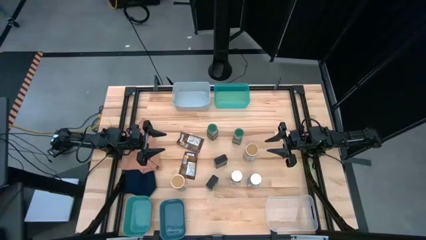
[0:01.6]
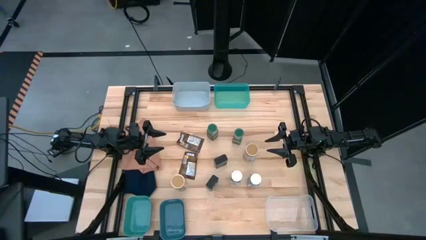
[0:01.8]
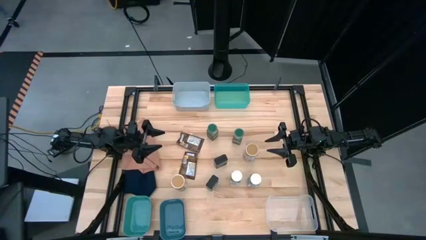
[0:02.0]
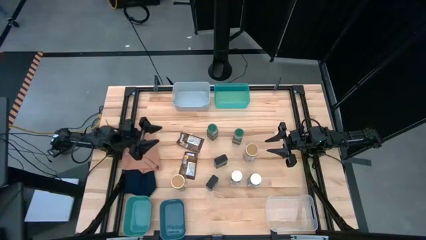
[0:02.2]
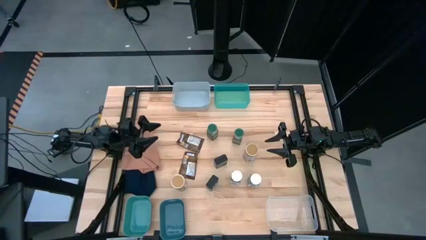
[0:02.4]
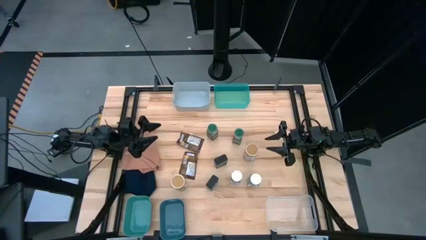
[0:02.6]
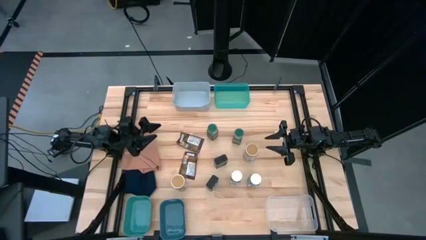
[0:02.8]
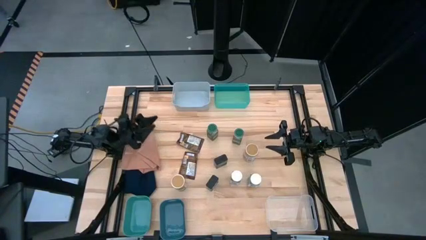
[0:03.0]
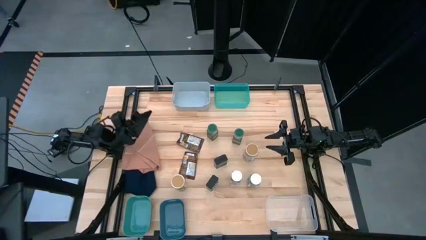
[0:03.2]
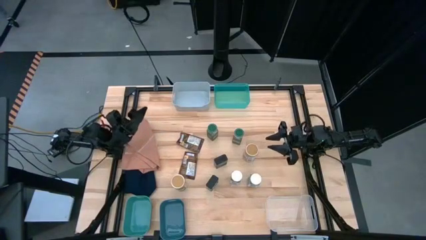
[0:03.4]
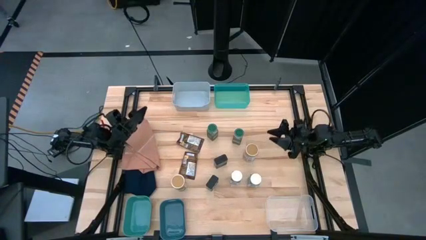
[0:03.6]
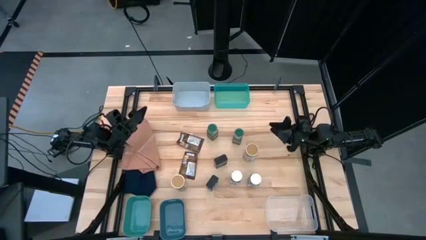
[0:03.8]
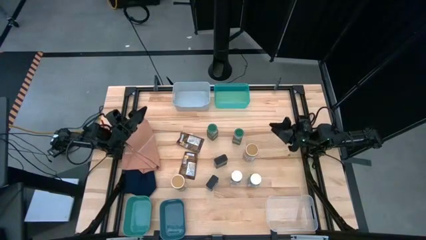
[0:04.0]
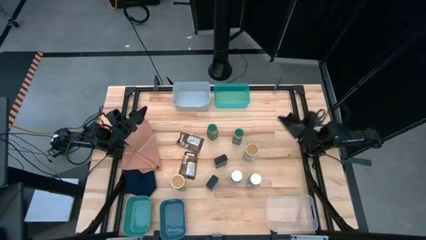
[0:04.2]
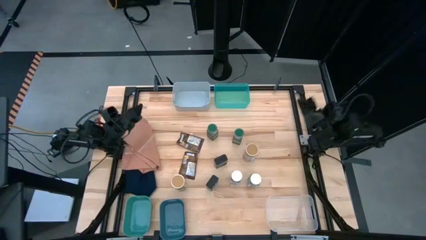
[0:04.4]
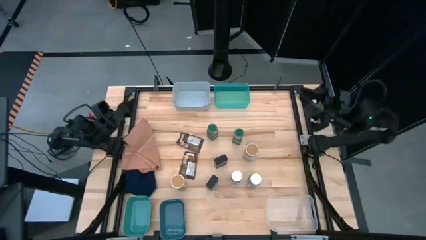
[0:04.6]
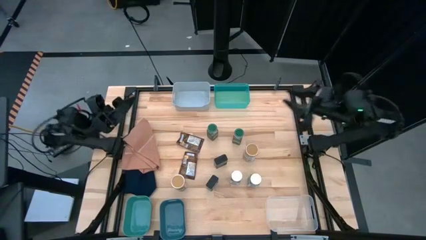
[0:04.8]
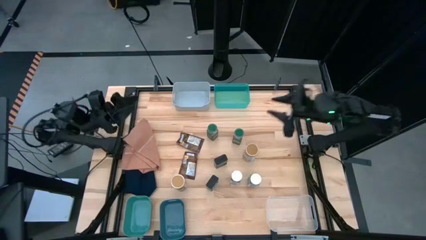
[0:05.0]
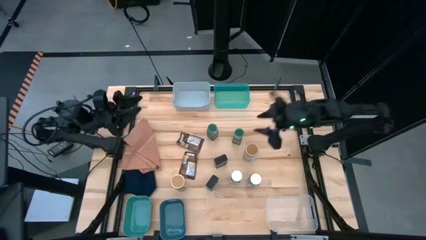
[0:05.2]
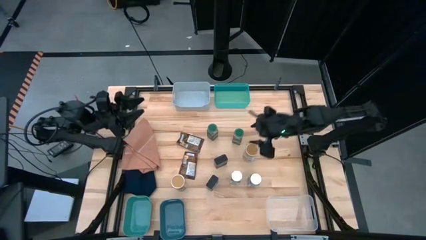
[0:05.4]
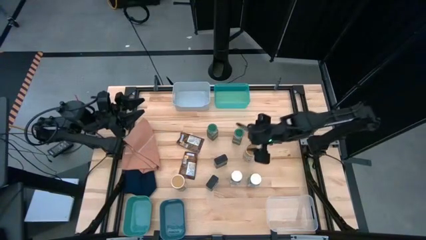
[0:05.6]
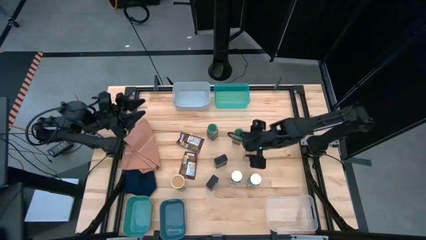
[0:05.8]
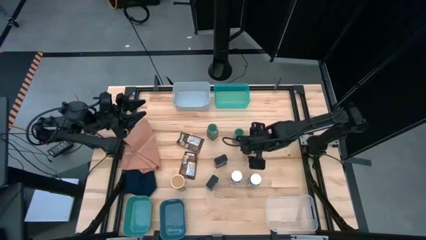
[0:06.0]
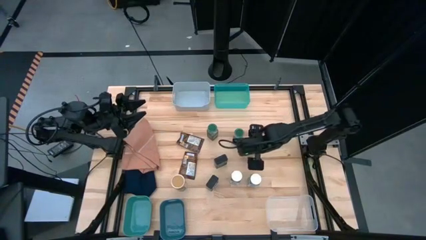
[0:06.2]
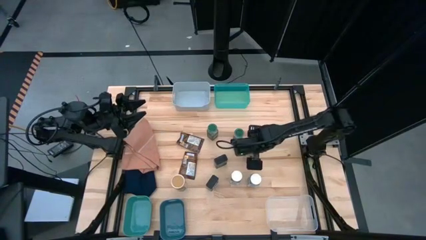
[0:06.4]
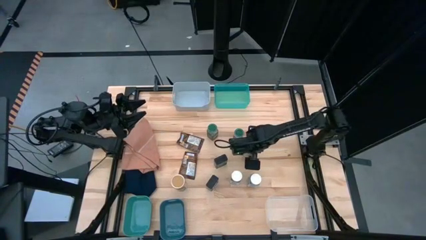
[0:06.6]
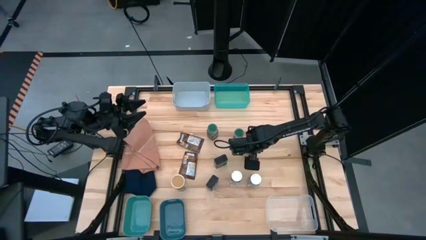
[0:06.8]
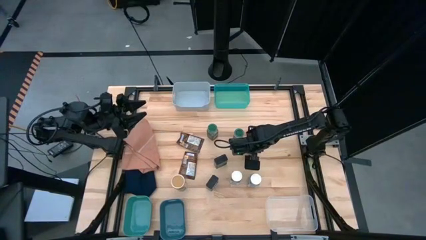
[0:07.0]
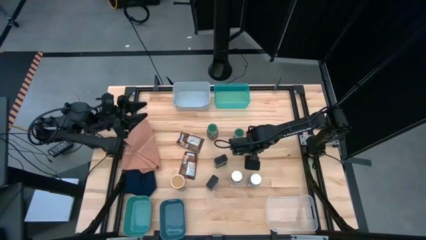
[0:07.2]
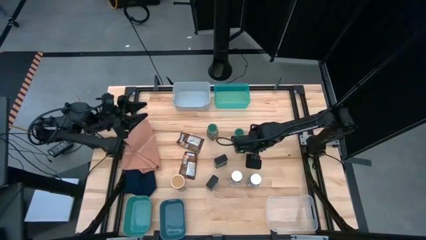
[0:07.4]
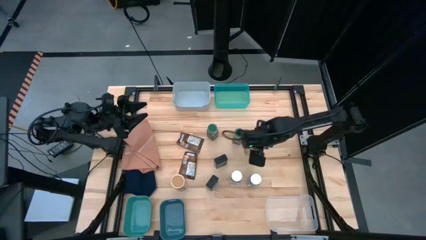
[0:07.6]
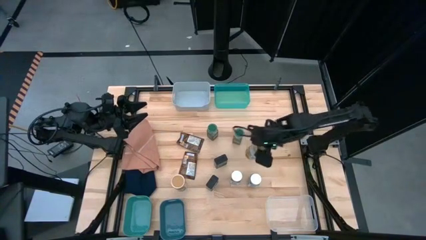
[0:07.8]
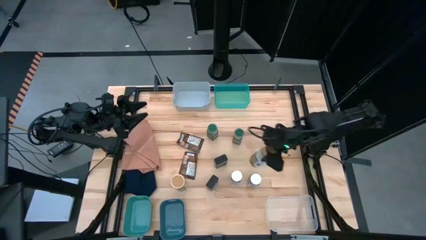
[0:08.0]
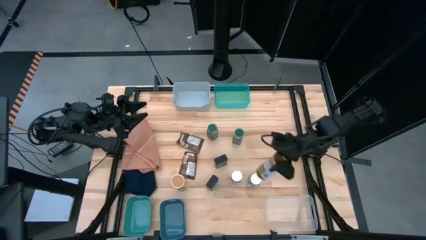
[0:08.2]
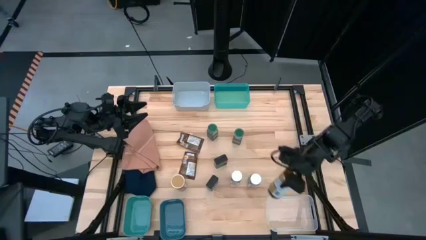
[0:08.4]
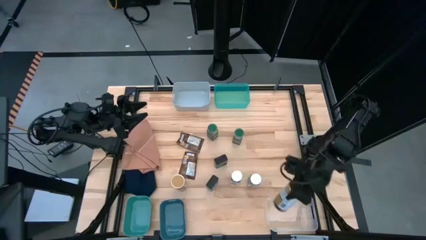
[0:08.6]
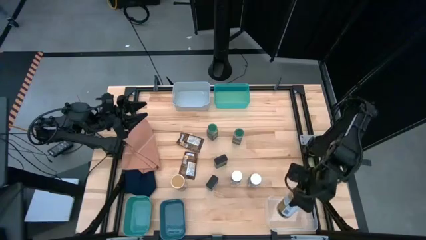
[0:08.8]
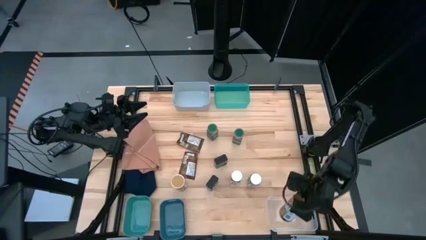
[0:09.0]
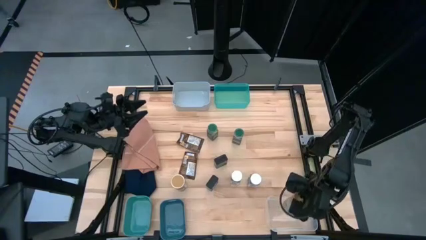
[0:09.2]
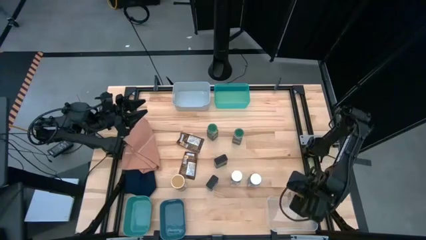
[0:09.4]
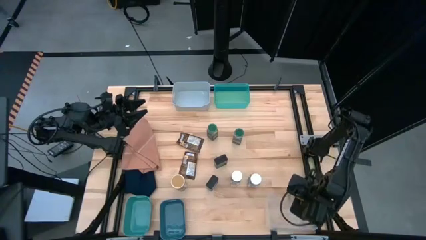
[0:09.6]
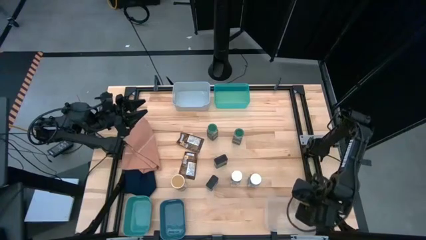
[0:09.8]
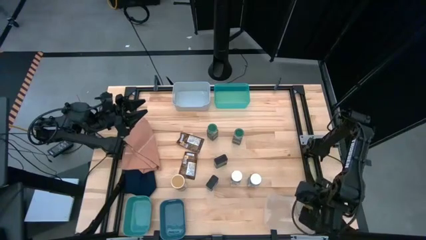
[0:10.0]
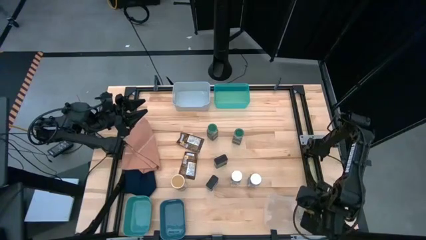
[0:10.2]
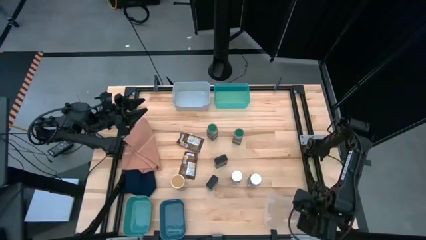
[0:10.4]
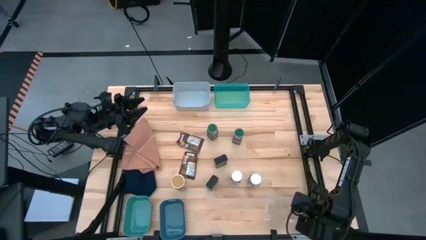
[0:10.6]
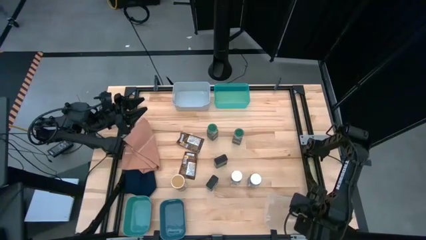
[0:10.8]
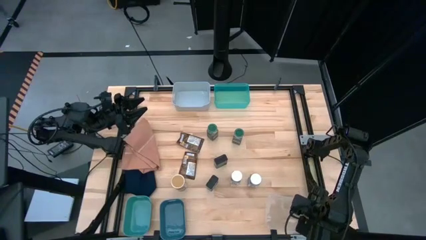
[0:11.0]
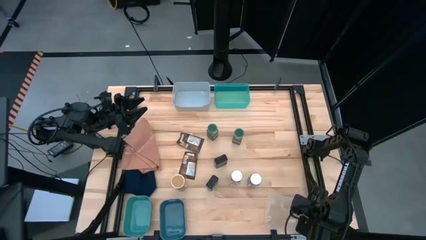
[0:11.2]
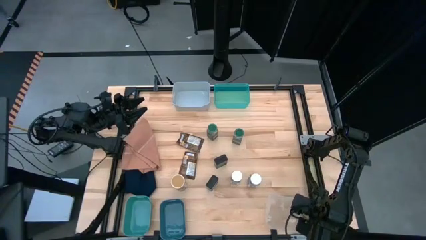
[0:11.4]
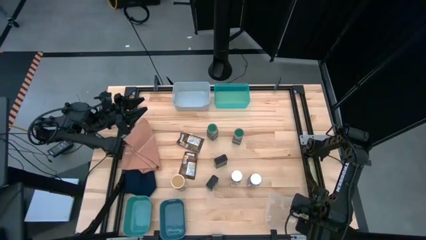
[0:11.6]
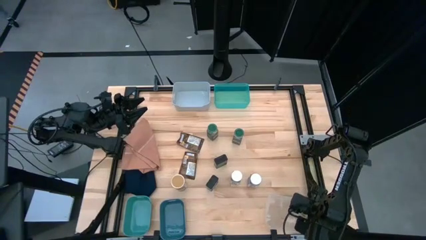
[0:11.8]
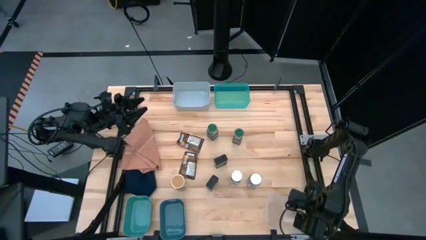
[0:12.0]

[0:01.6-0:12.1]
Task: Sort spices by type
Put the top gold spice bottle into the transparent bin
